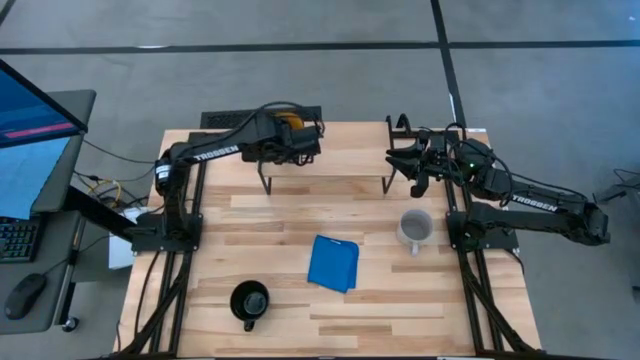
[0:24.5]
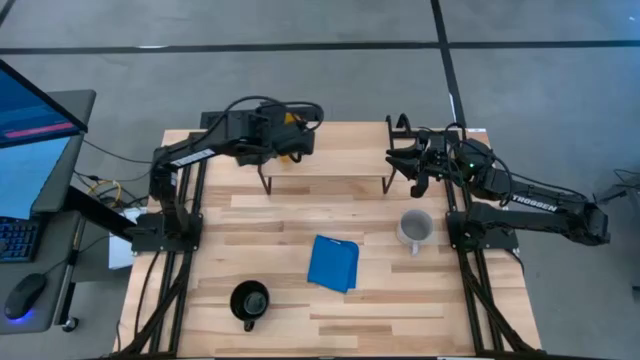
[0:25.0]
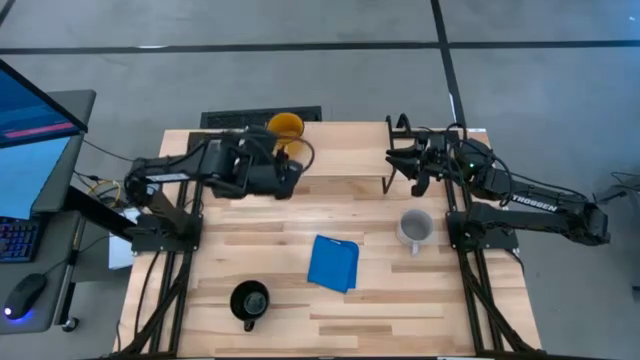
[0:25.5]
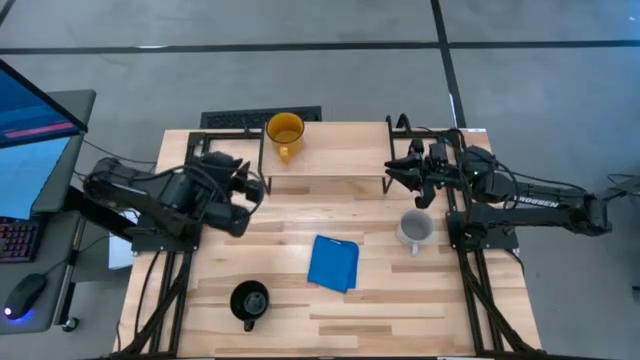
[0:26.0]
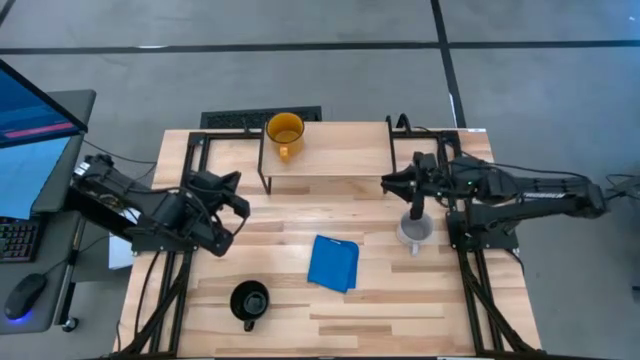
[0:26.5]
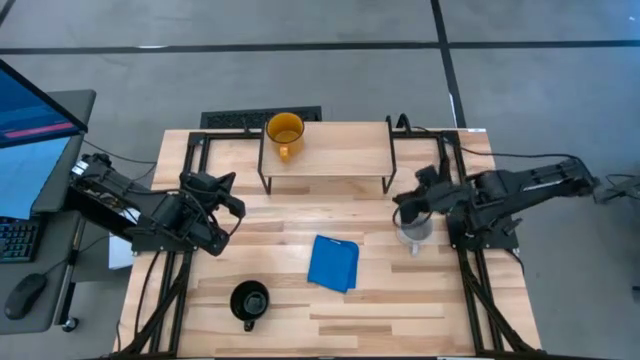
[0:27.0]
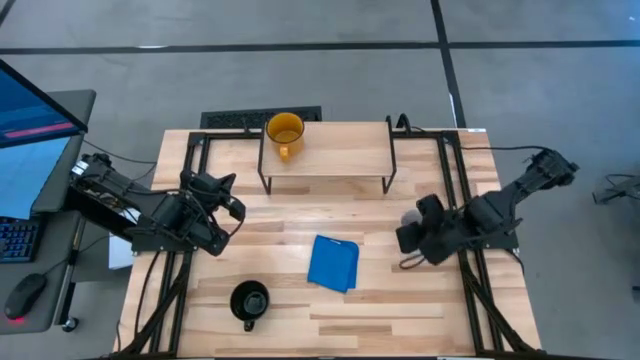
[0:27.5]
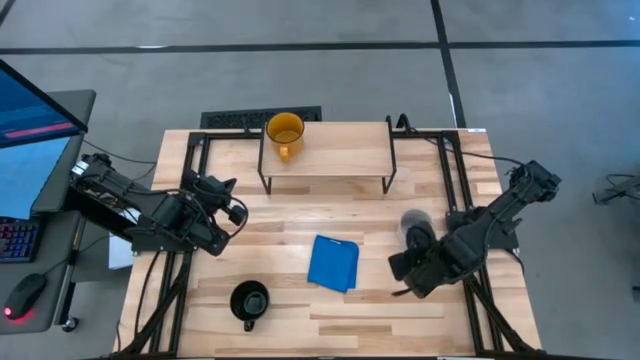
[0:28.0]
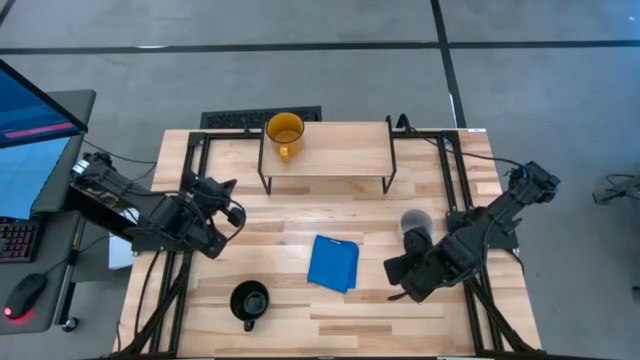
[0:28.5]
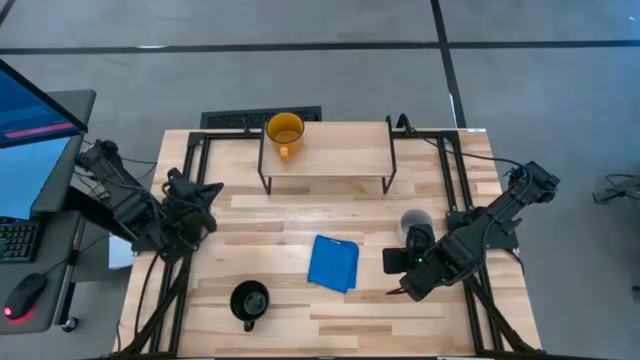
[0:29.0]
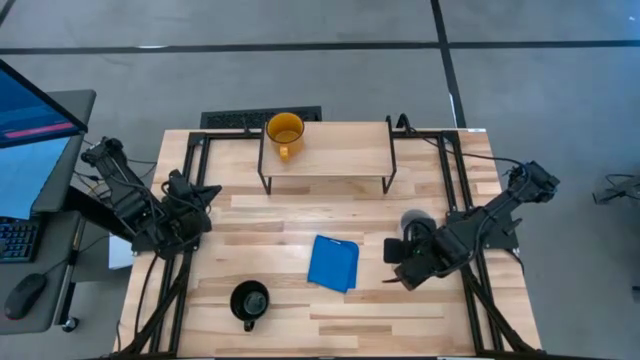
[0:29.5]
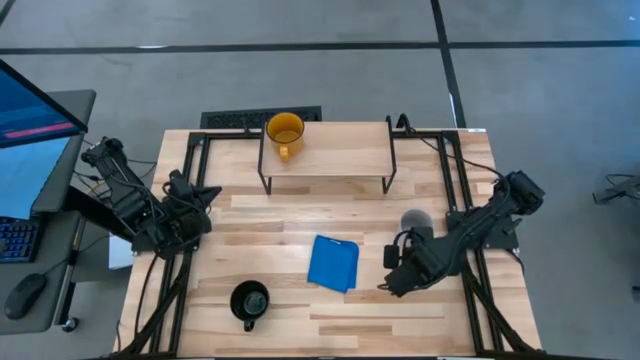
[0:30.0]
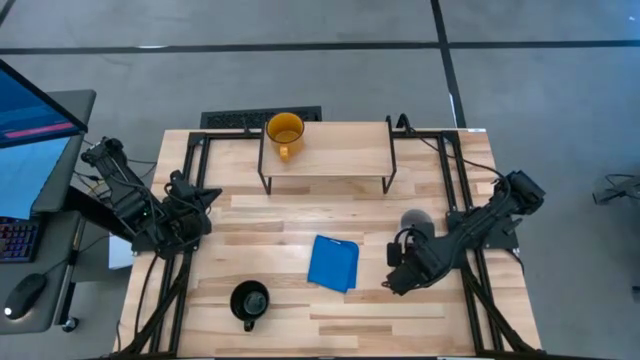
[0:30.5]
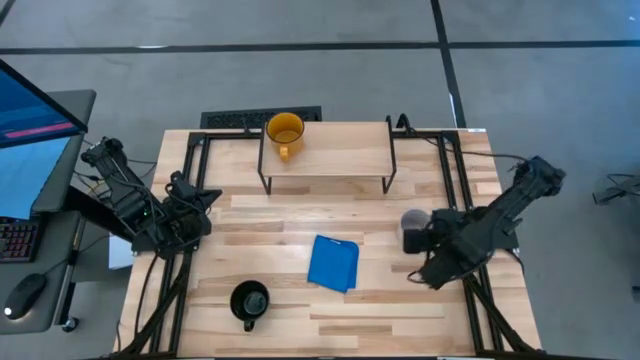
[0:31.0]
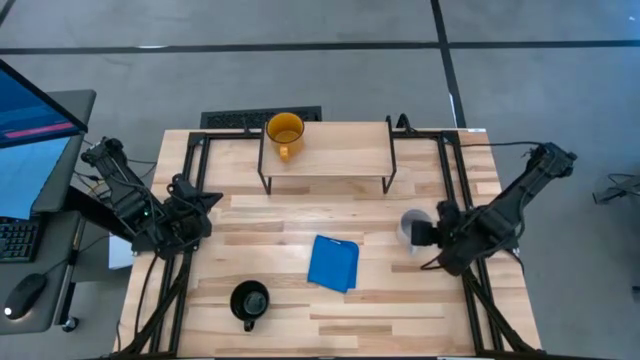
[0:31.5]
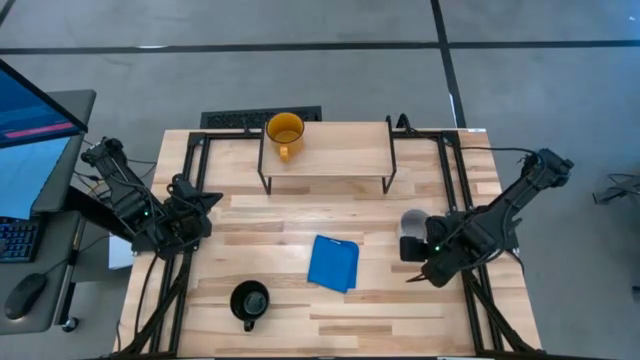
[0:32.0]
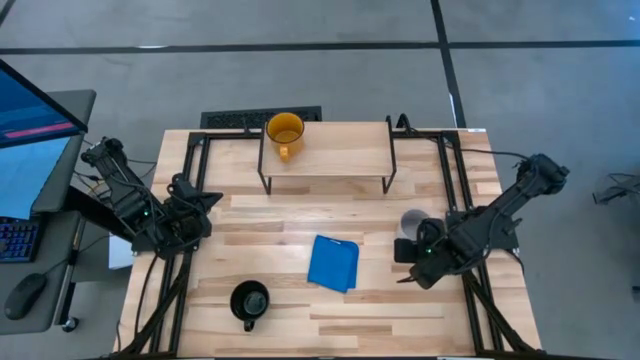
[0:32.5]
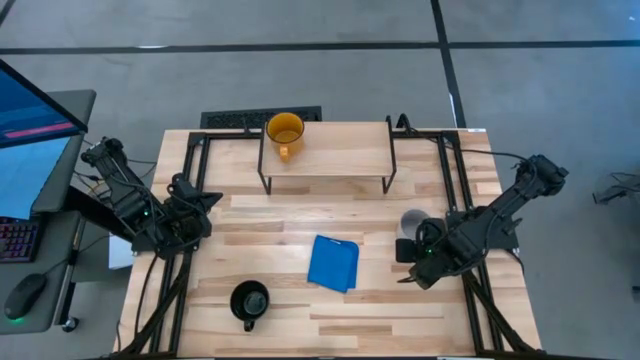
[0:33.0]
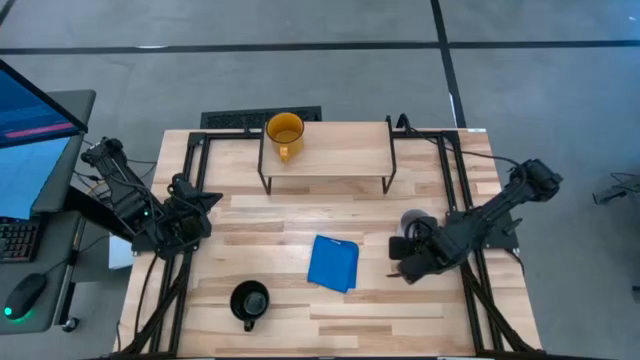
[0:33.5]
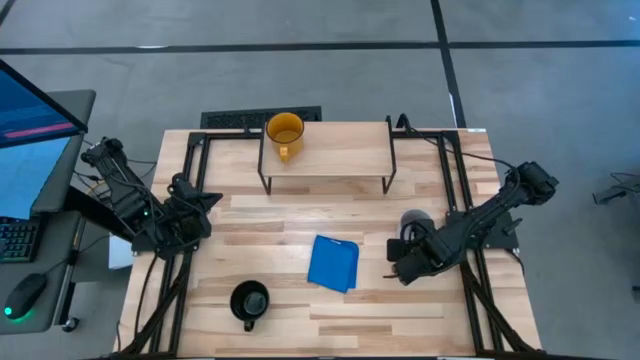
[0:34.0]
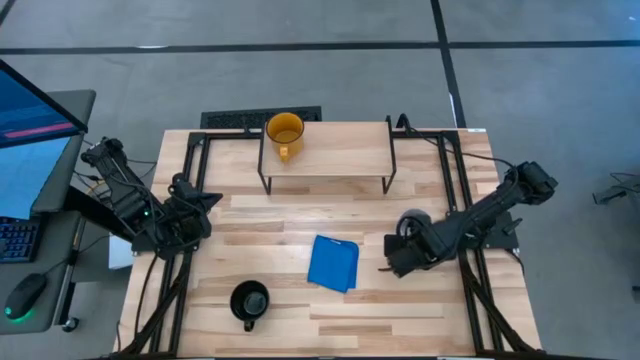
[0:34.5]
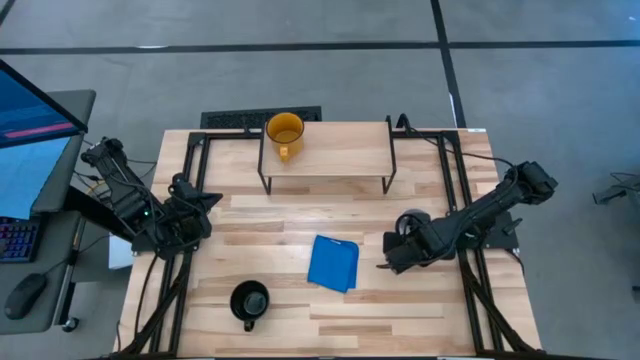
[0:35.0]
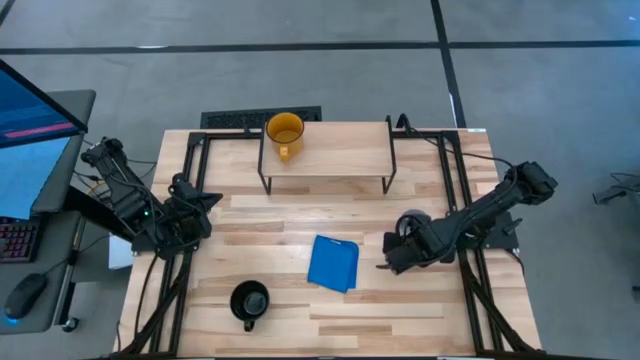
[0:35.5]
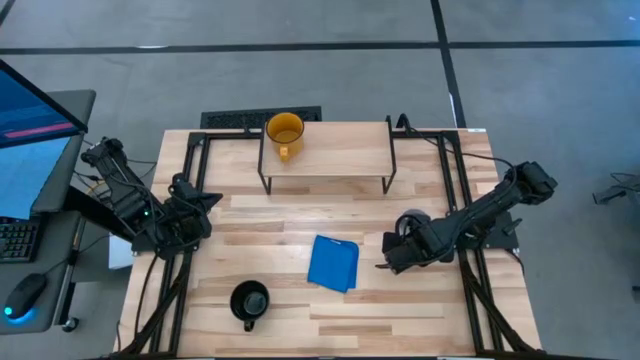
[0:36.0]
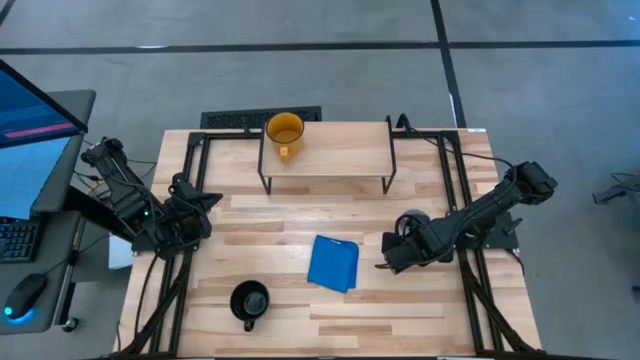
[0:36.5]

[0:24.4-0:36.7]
Task: Stack small to large cups/mugs on shelf
Put the white mug on the shelf

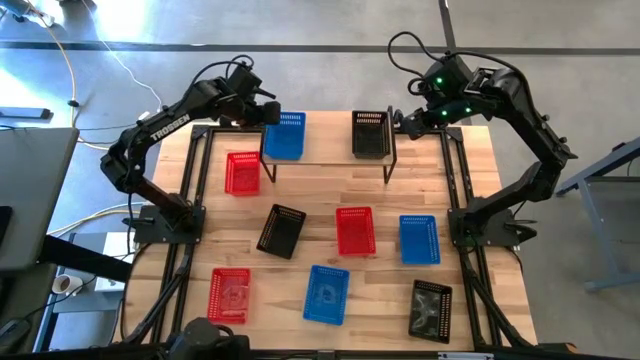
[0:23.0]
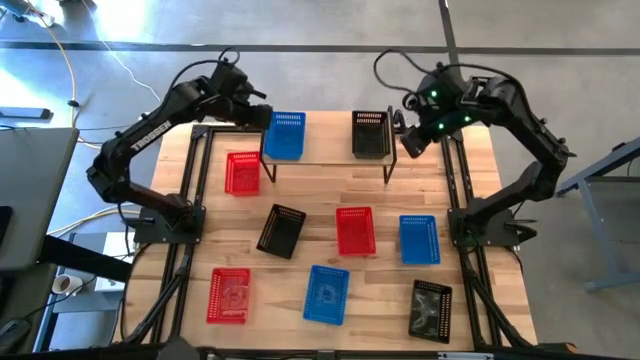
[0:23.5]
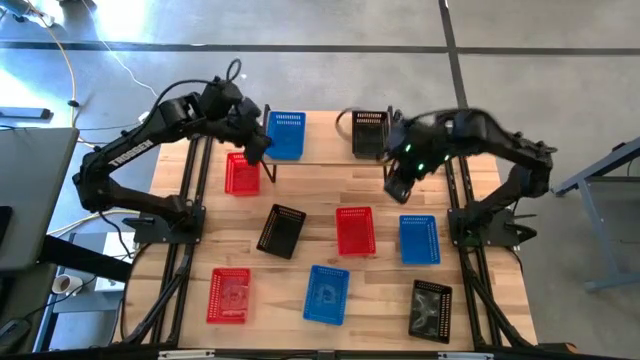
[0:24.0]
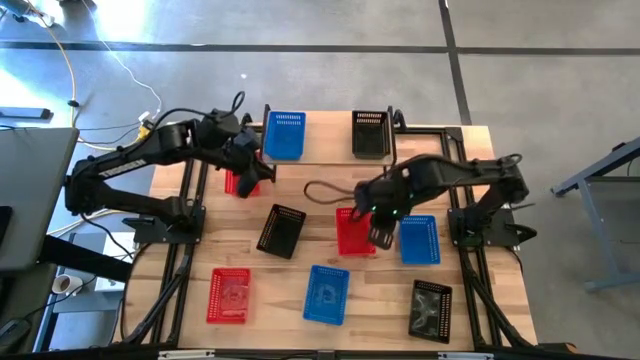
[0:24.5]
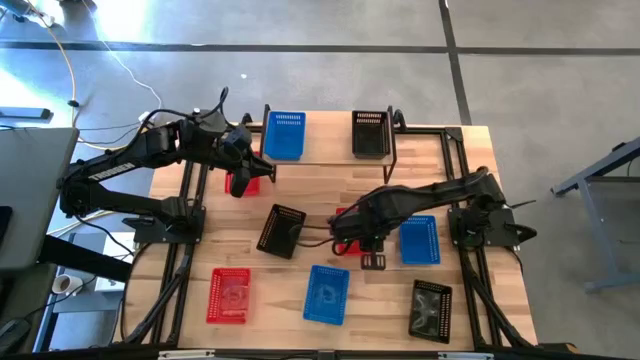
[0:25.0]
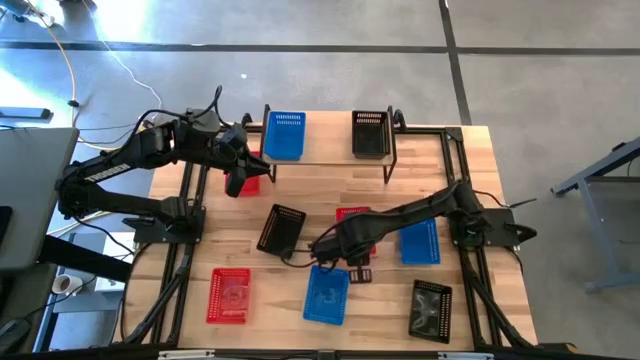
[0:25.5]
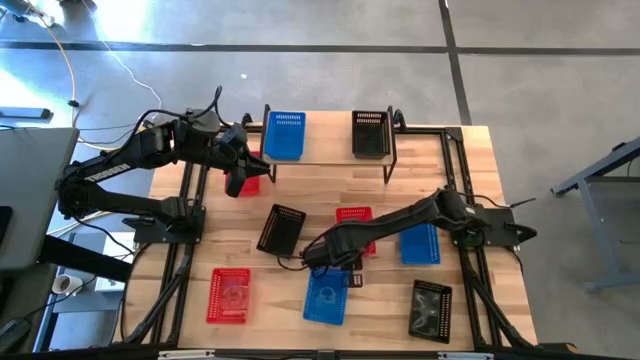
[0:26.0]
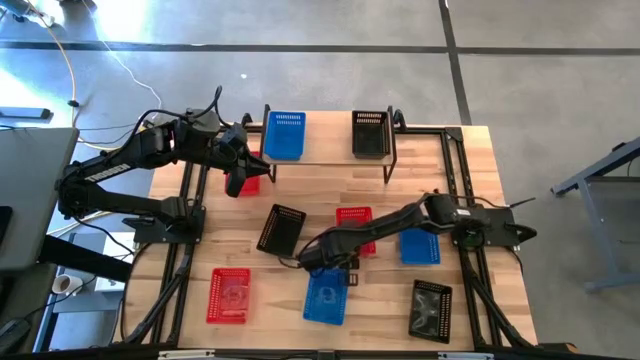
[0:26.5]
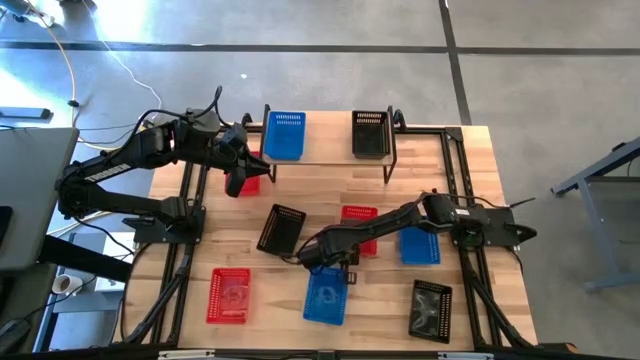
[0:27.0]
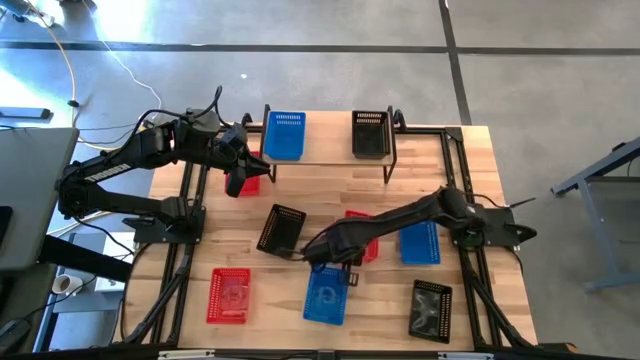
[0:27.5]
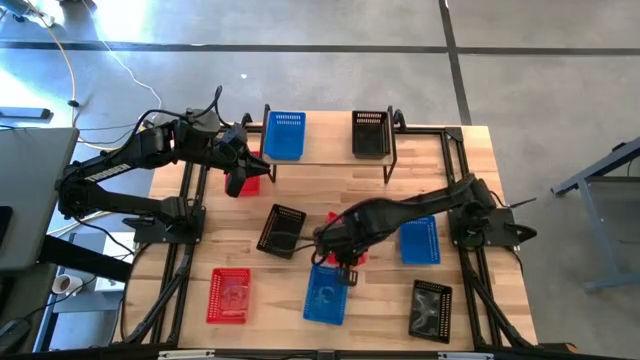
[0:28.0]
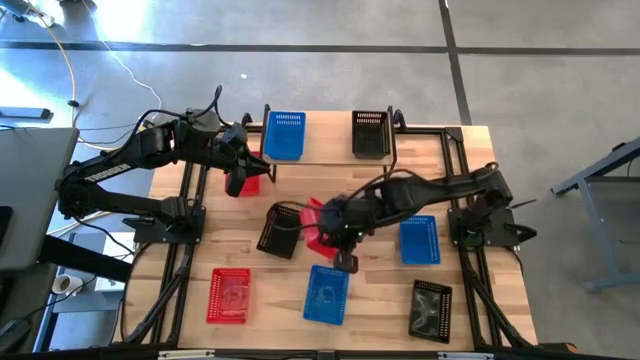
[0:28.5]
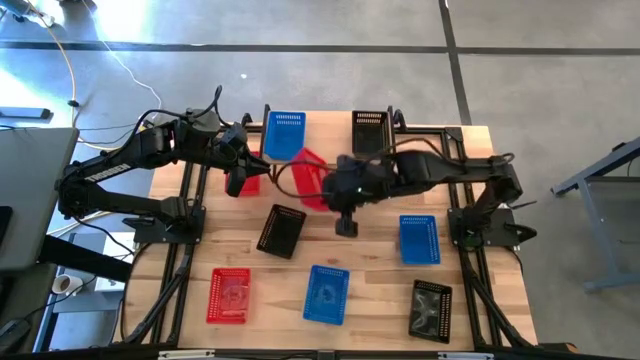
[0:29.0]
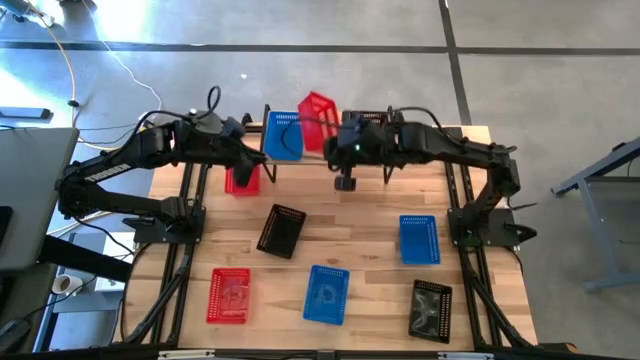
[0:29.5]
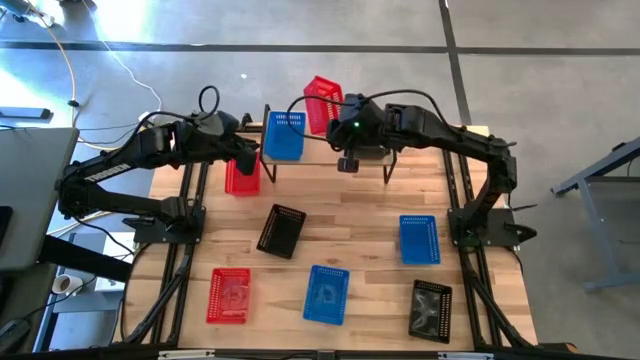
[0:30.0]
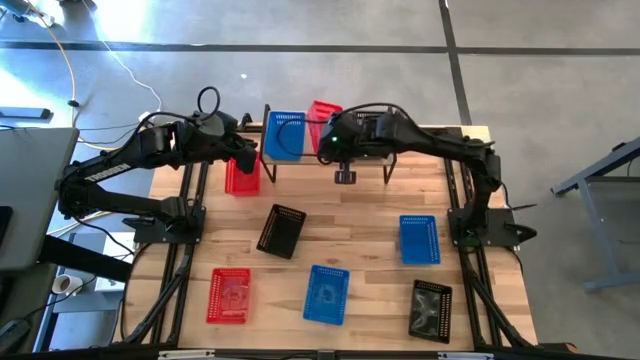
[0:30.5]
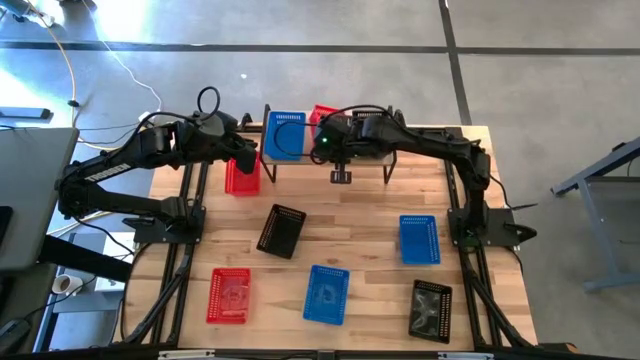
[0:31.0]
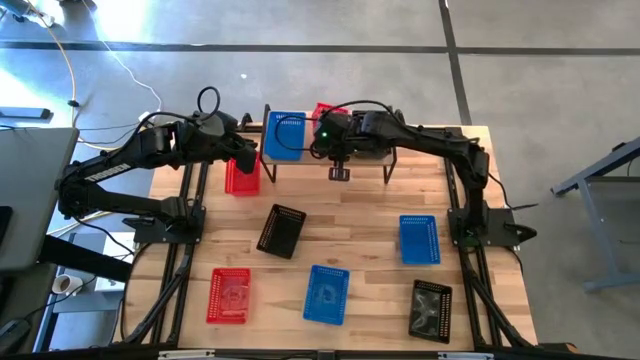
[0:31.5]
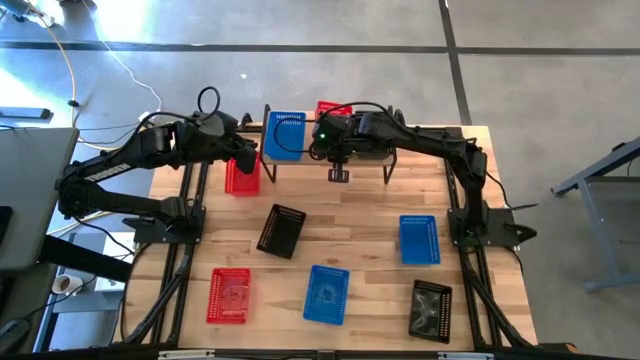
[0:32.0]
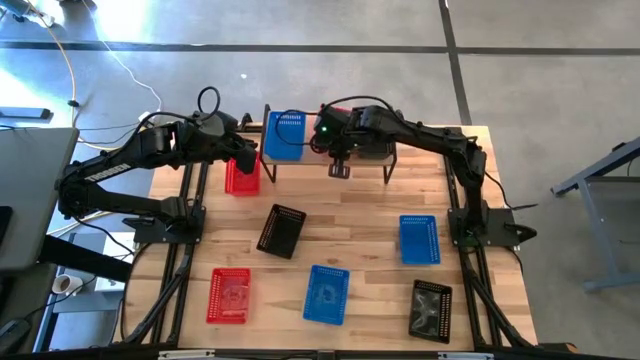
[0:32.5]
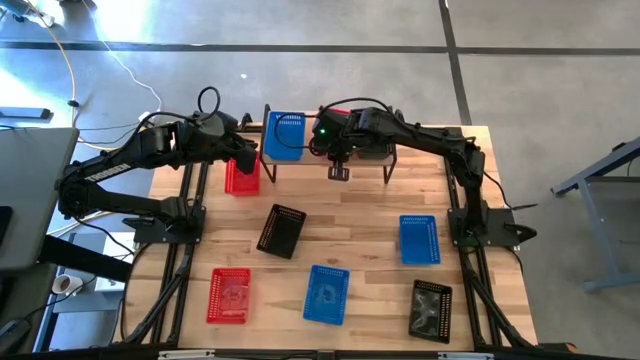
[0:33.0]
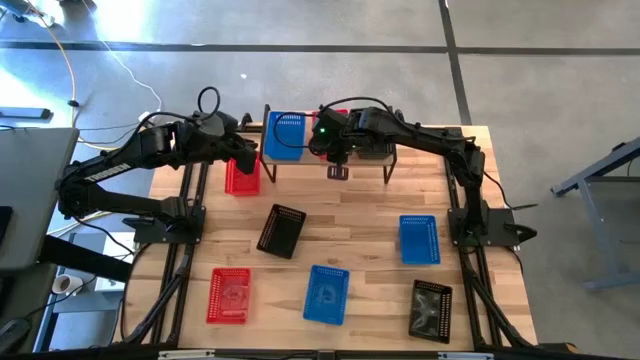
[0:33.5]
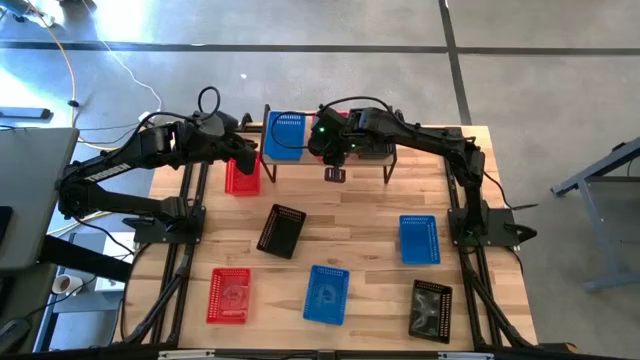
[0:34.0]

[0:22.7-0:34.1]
Task: Stack baskets on shelf by color
Put the right red basket on the shelf
